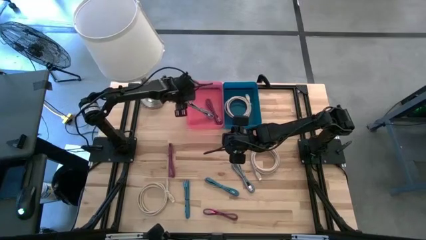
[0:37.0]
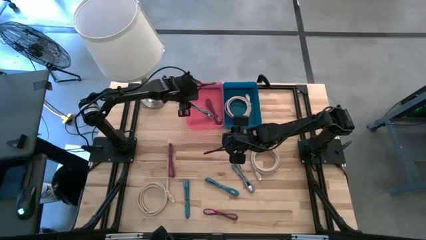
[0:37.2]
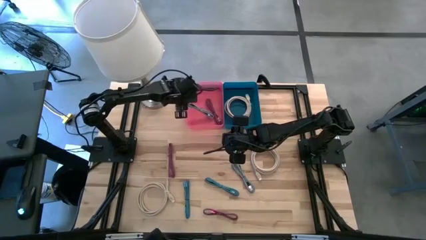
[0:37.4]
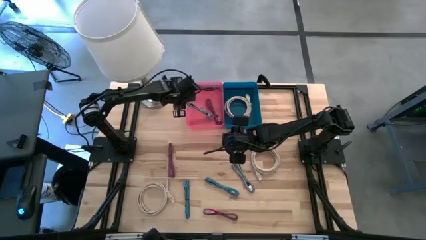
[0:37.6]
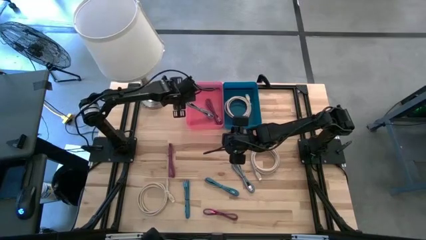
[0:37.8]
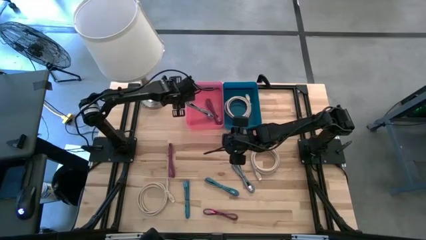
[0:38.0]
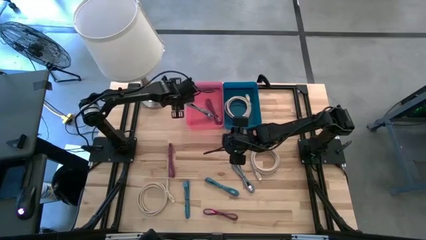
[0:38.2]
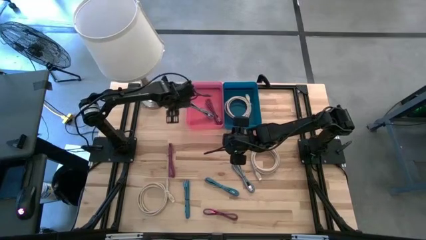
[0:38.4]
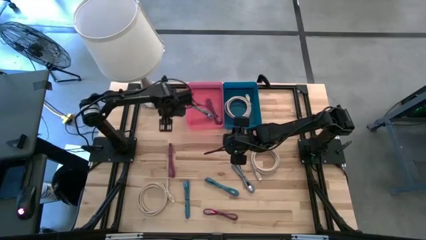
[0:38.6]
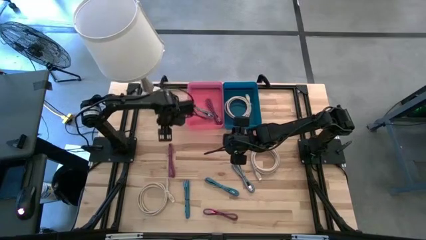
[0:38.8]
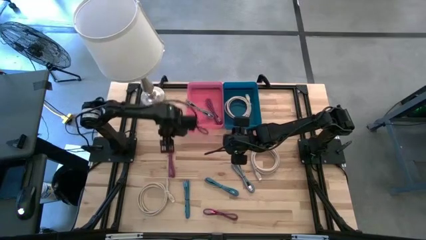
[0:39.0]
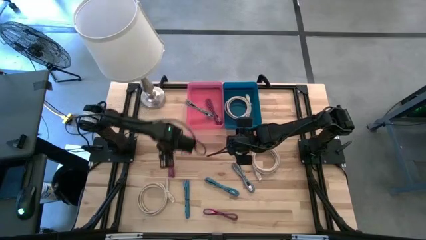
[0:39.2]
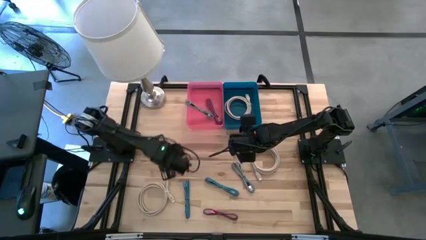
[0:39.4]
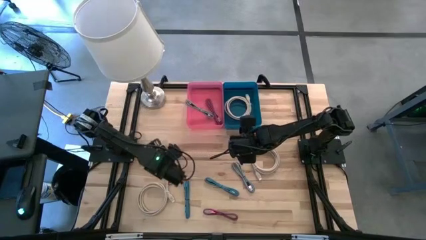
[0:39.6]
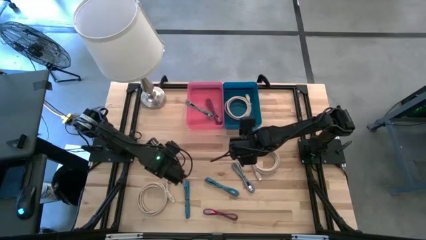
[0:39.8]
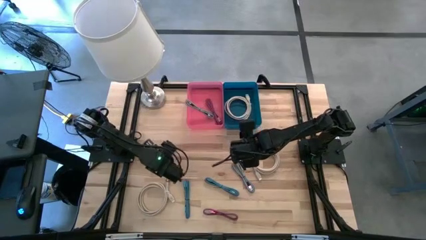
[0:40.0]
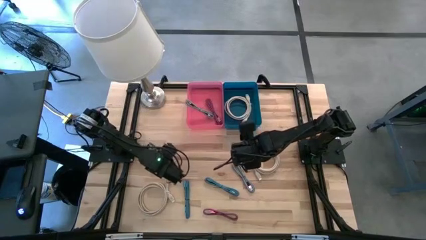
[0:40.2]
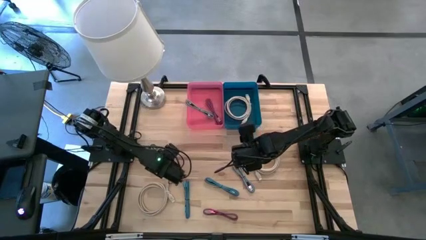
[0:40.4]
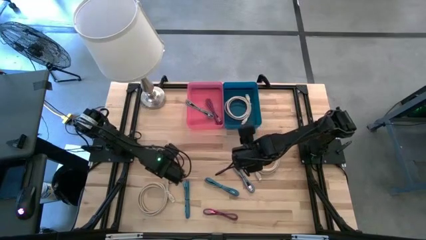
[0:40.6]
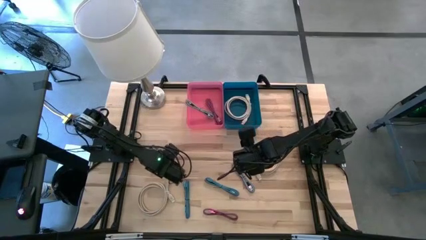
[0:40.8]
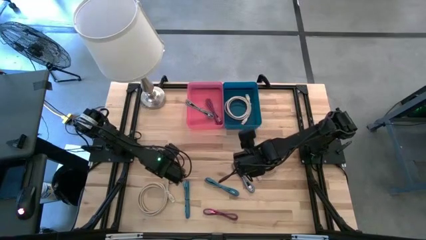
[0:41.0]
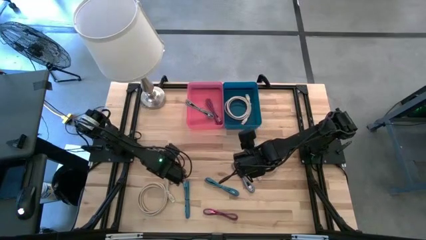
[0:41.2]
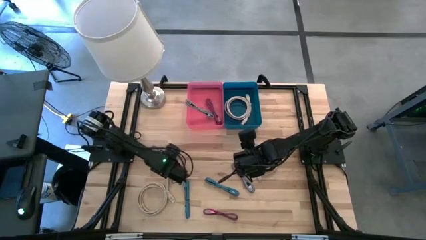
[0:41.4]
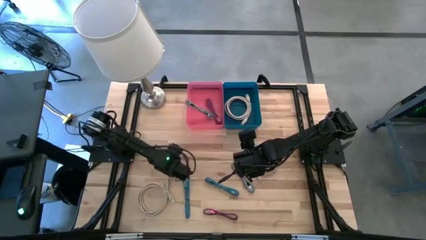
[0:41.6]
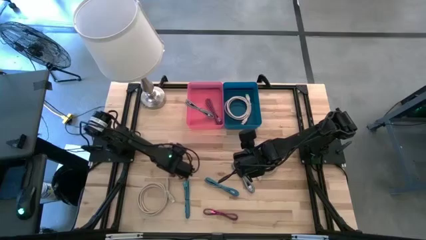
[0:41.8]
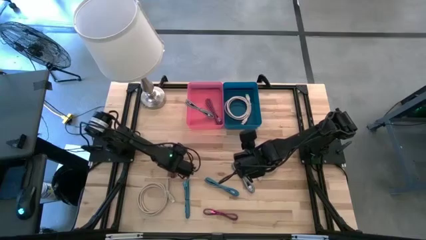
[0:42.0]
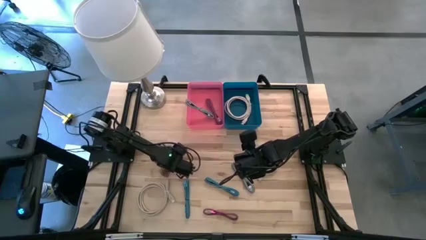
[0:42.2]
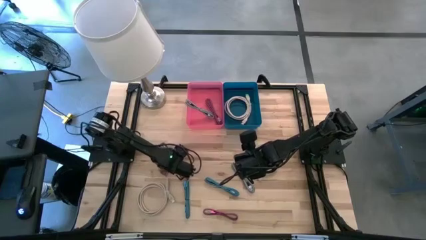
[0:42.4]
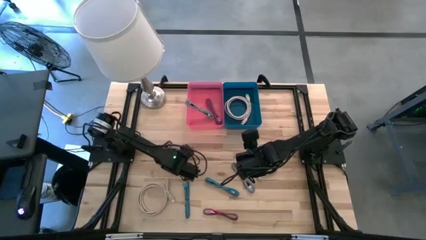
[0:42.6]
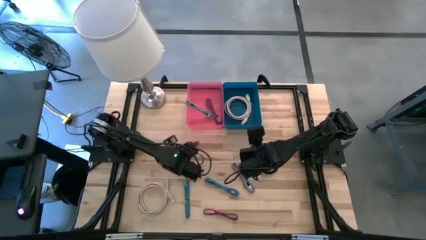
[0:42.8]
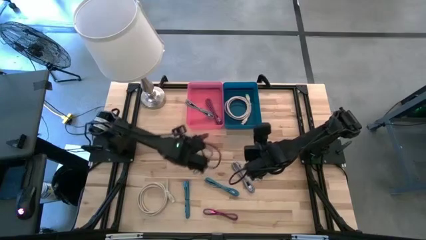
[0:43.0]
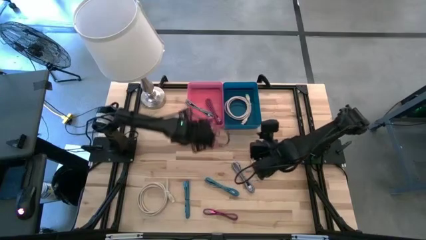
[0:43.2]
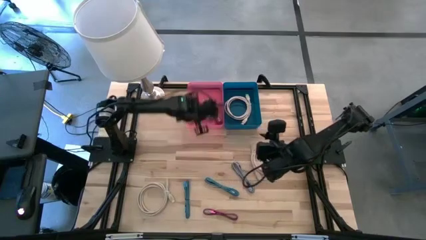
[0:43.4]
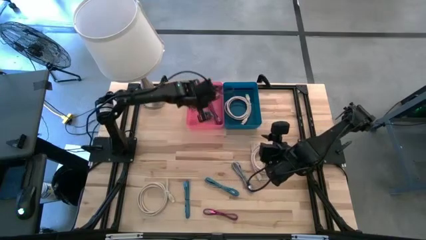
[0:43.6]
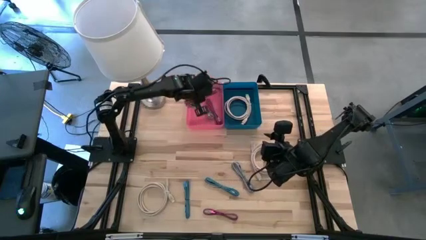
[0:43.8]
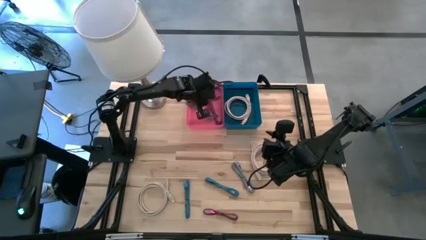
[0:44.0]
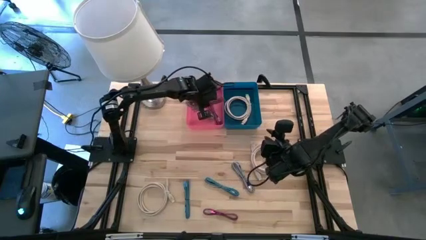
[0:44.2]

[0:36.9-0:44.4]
Task: Pick & Place USB Port
Put the top pink charger cable into the pink bin

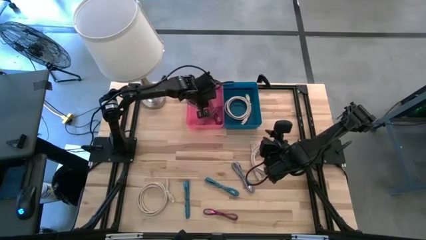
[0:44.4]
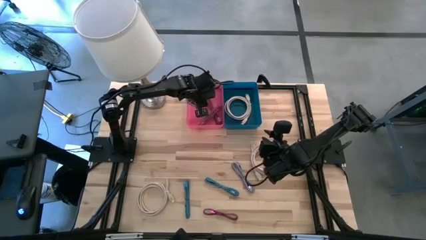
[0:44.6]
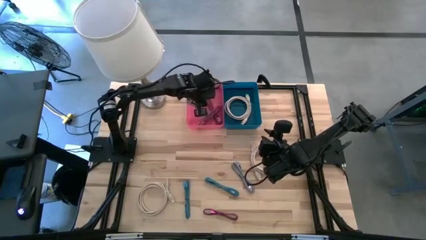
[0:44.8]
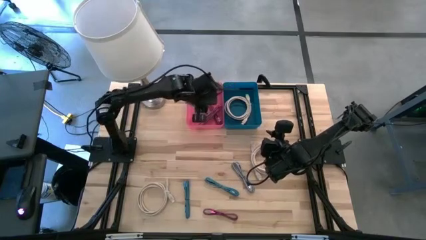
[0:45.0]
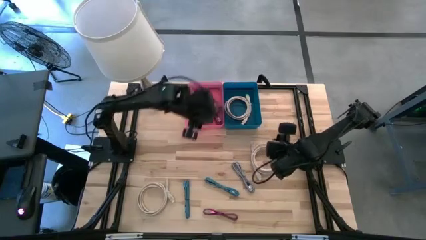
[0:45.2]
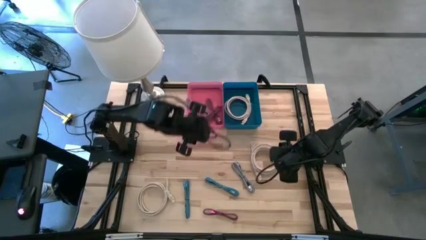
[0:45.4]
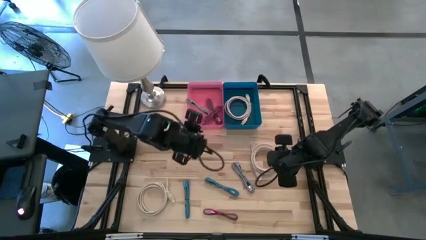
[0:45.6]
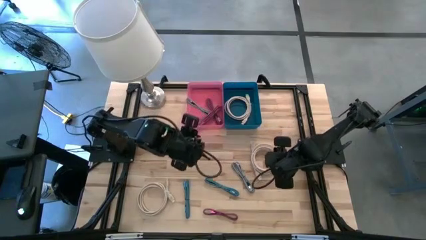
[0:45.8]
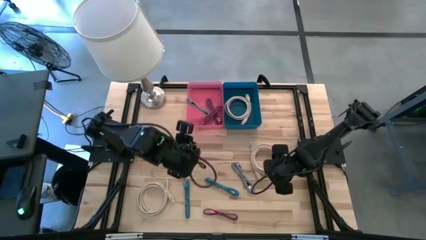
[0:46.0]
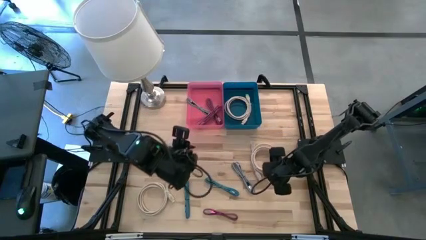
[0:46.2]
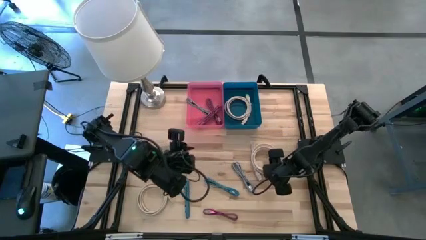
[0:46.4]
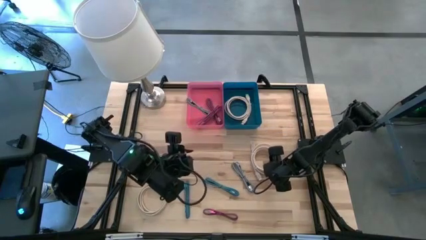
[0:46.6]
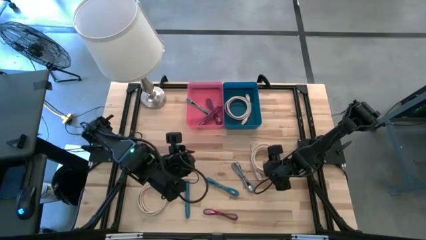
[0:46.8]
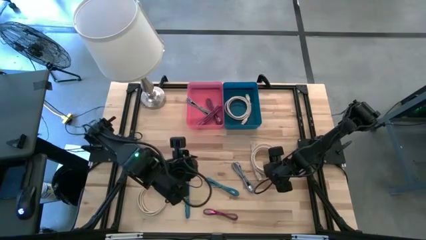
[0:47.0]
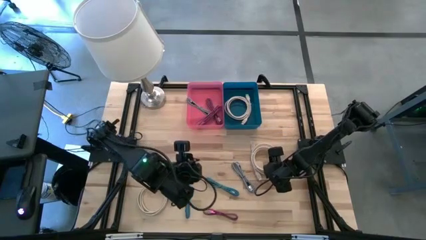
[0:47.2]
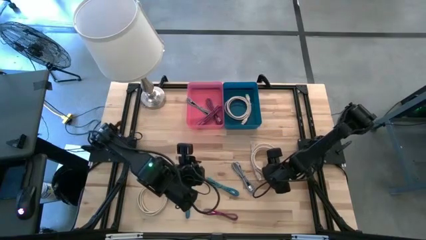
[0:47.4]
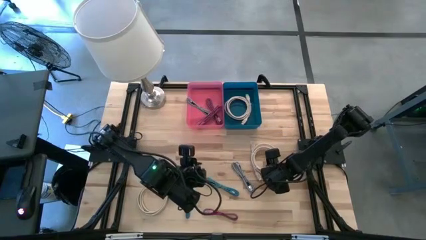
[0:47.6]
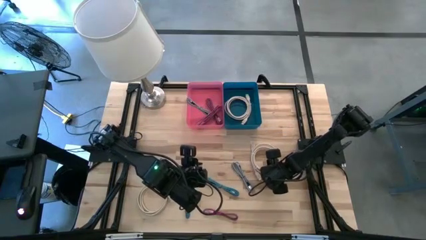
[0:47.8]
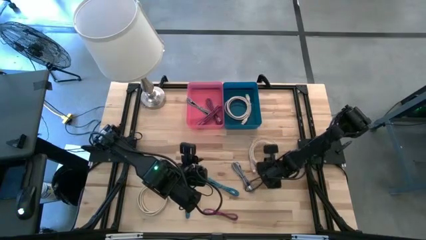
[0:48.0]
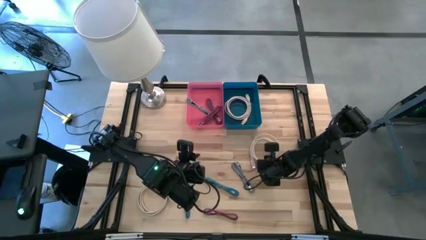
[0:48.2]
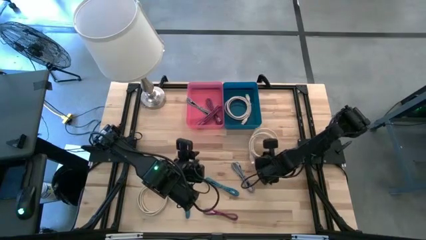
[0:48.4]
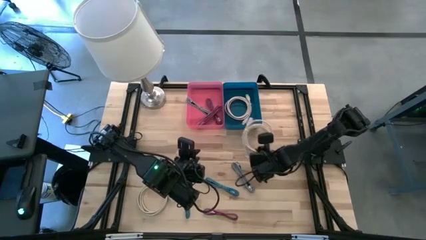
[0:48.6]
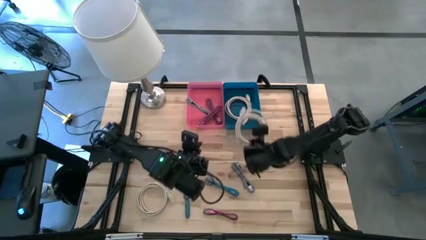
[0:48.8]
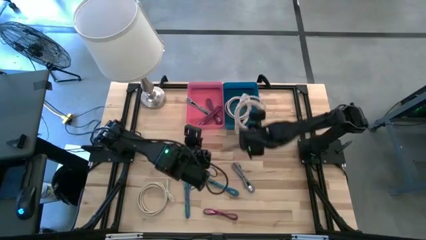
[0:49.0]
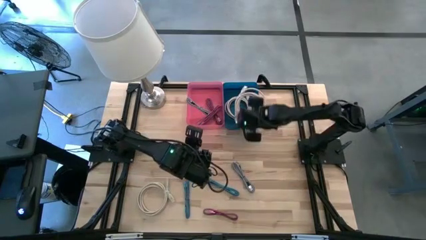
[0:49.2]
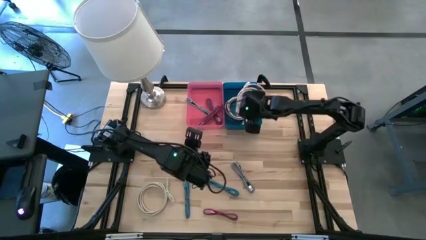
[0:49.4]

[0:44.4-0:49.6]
Put the top white HDMI cable into the blue bin
